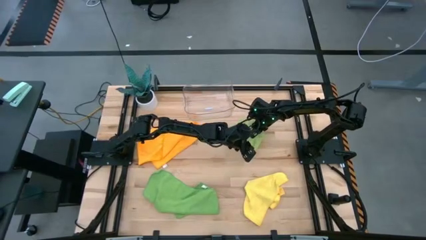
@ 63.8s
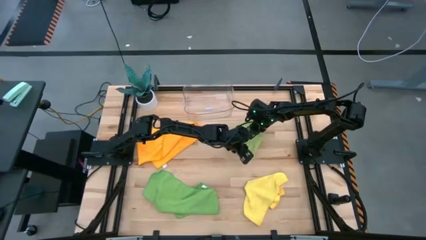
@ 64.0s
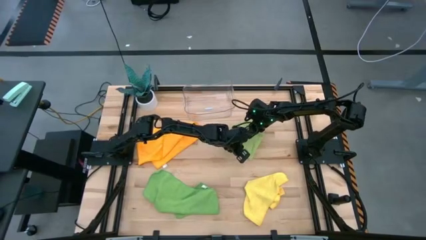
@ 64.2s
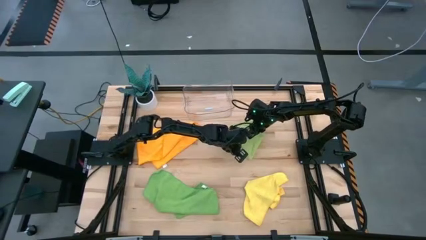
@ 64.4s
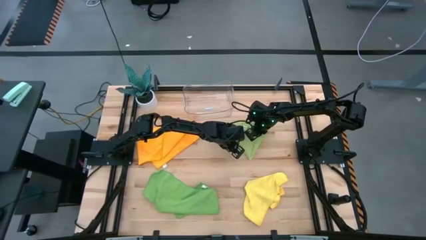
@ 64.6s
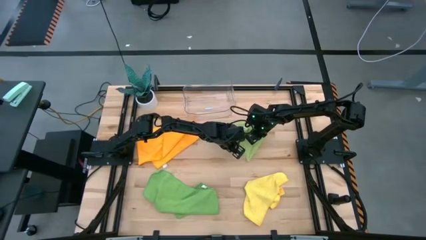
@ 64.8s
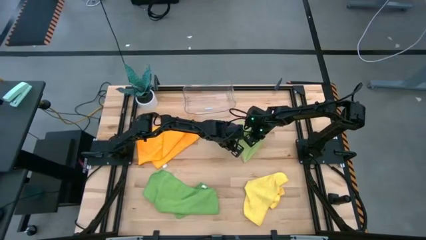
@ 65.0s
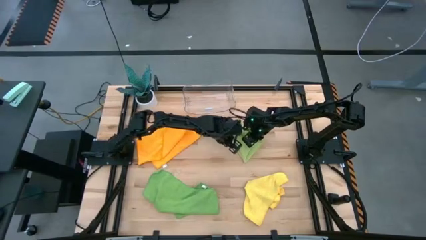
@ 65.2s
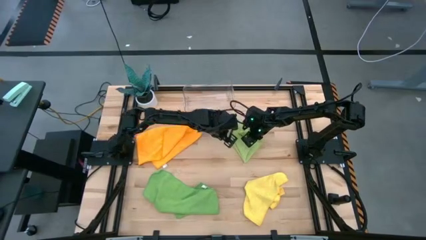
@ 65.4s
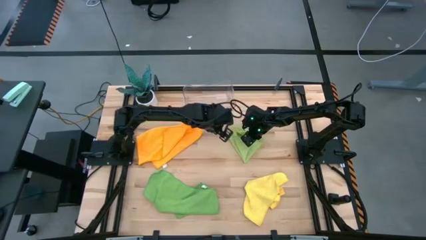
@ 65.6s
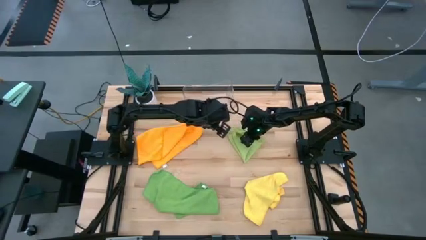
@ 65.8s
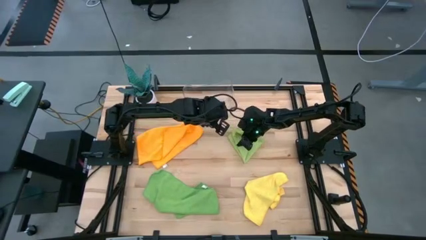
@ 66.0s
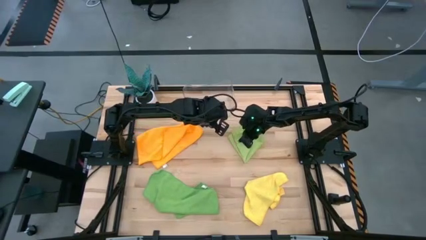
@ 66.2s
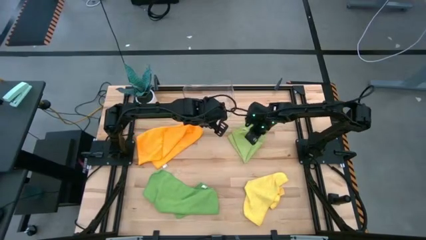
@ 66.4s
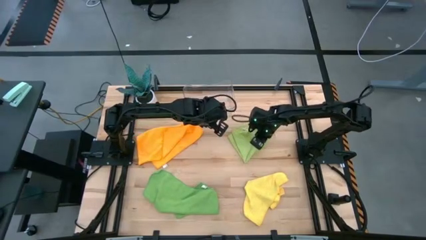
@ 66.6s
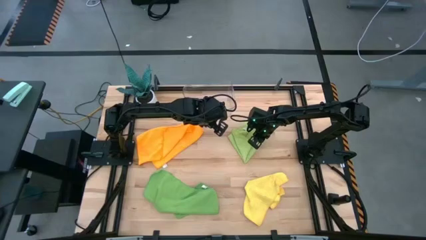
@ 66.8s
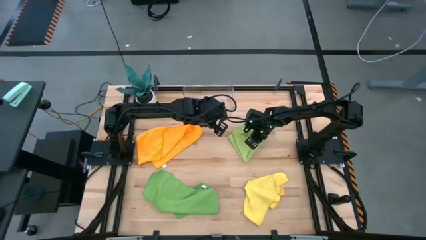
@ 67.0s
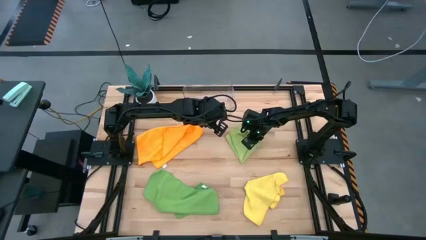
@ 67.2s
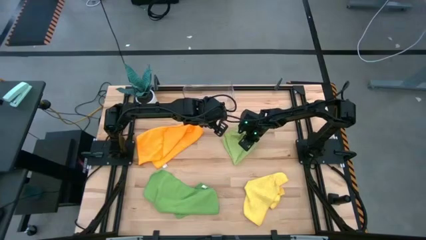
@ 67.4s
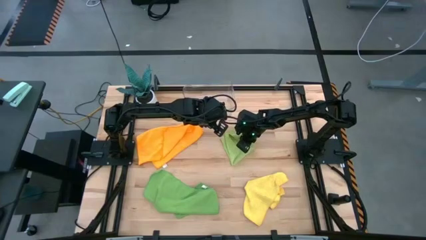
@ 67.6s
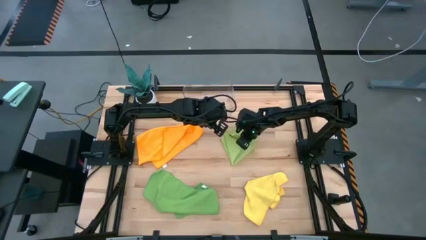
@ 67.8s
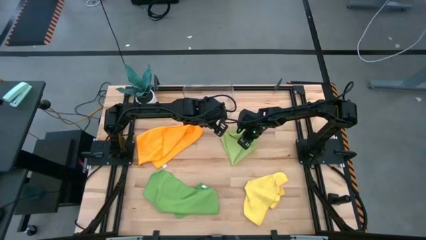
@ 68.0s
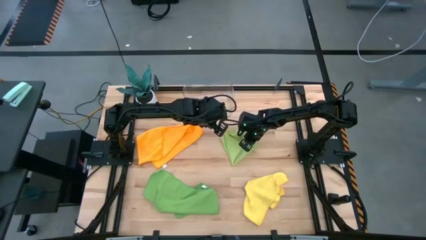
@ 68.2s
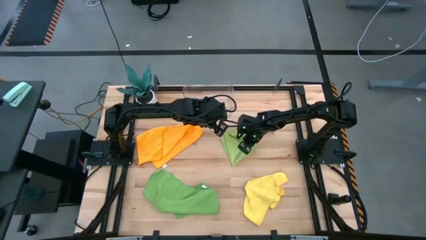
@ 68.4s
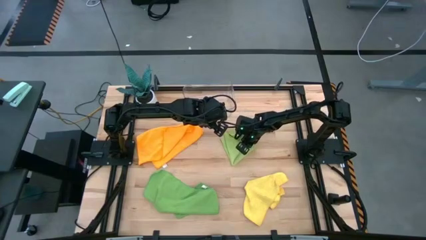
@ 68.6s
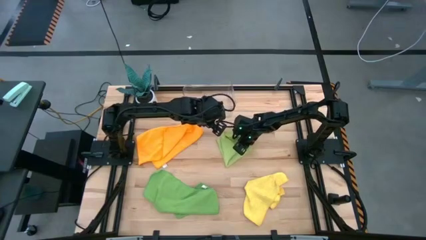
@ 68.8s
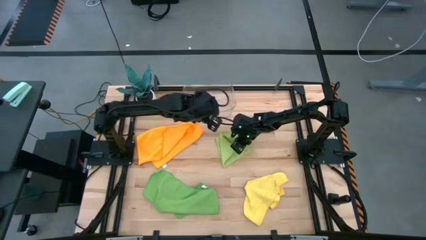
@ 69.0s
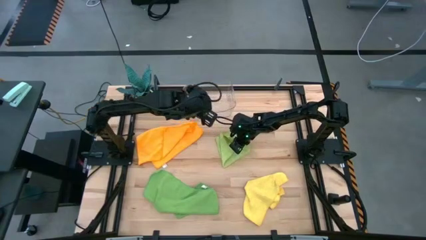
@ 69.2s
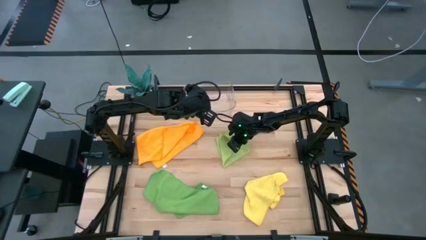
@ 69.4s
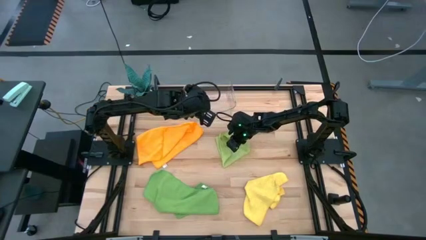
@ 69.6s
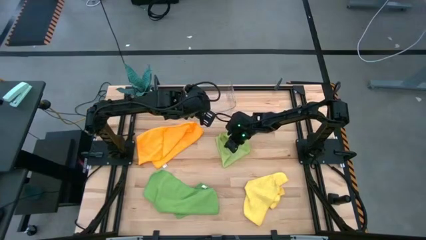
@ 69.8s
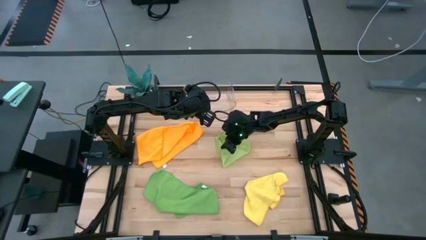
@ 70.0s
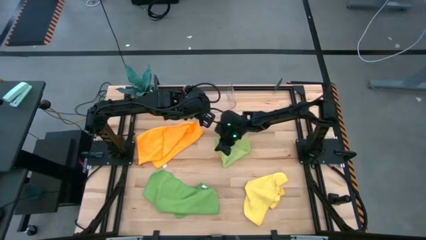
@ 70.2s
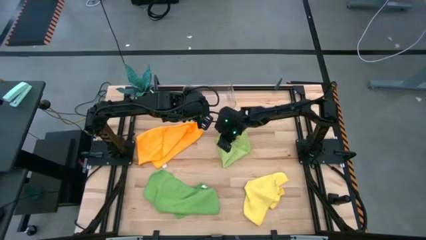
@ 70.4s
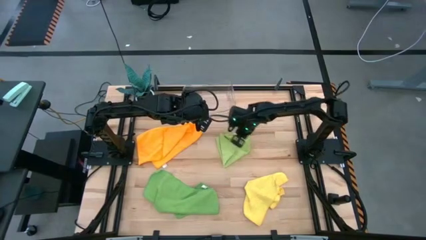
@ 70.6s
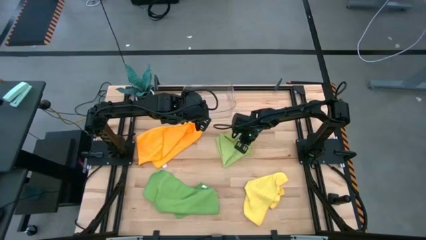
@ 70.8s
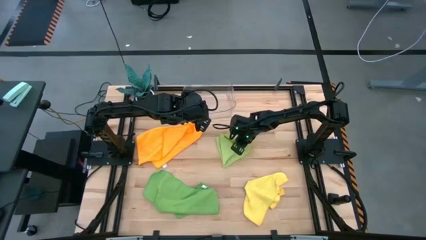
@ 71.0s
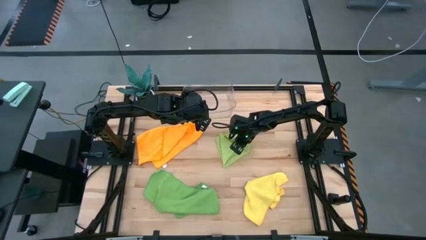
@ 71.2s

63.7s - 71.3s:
Task: Fold microfiber towels
Fold the light green microfiber cloth

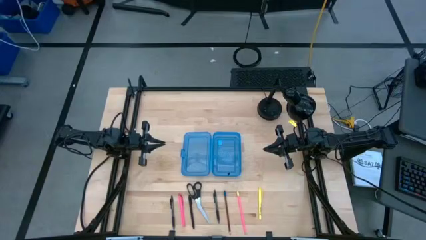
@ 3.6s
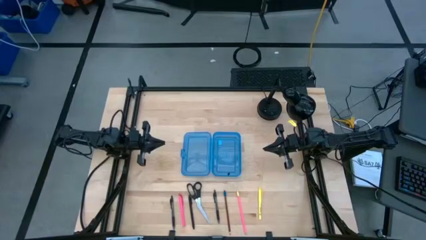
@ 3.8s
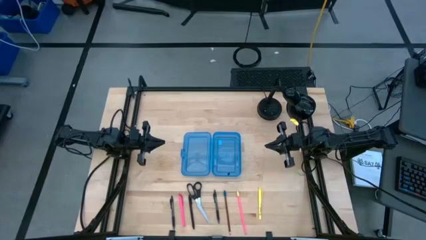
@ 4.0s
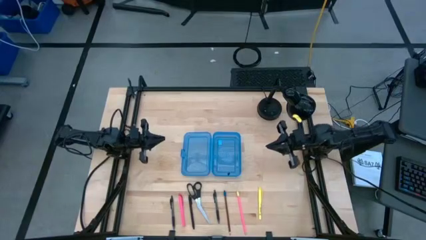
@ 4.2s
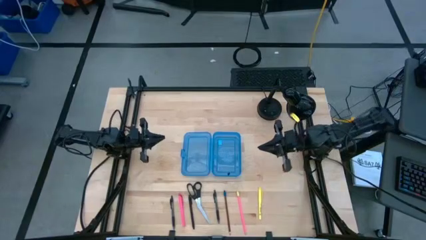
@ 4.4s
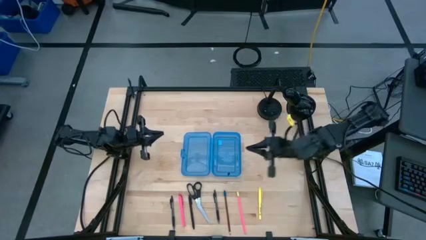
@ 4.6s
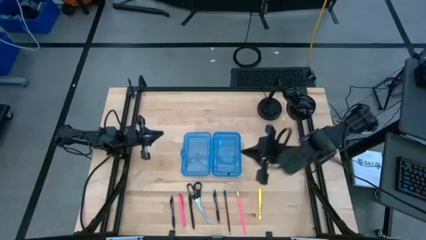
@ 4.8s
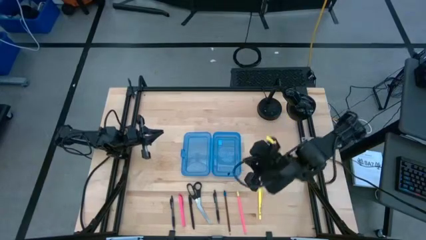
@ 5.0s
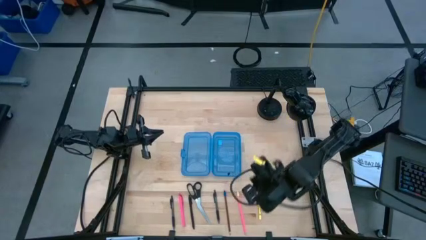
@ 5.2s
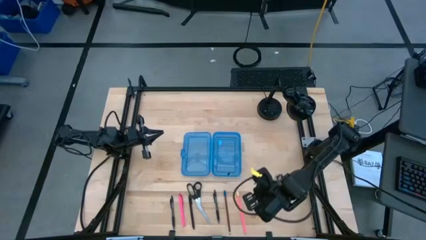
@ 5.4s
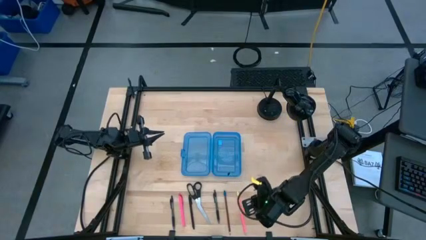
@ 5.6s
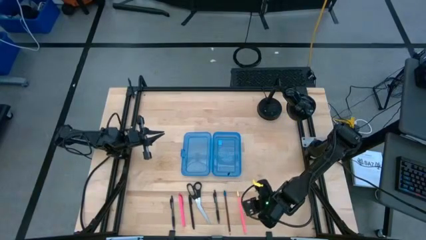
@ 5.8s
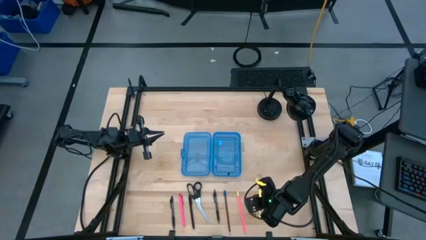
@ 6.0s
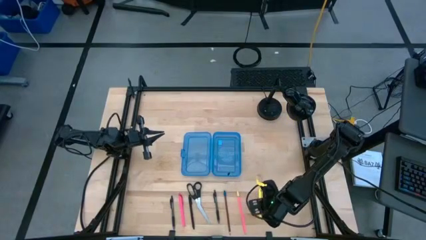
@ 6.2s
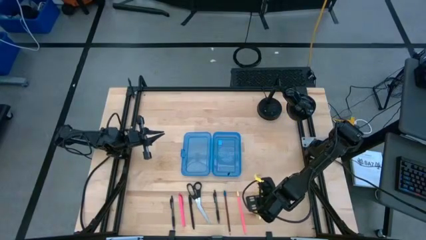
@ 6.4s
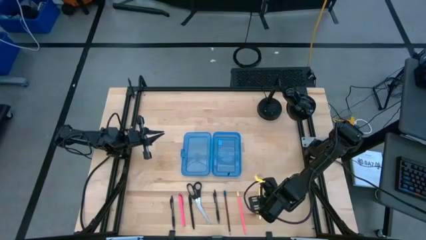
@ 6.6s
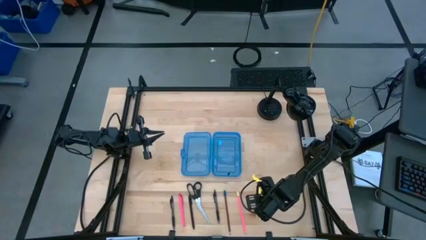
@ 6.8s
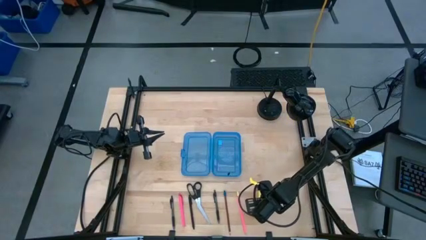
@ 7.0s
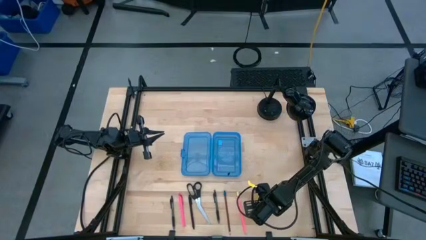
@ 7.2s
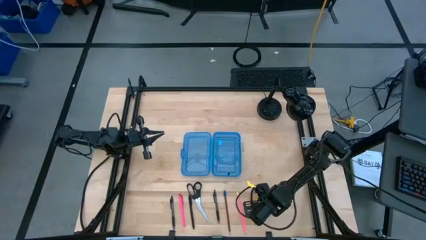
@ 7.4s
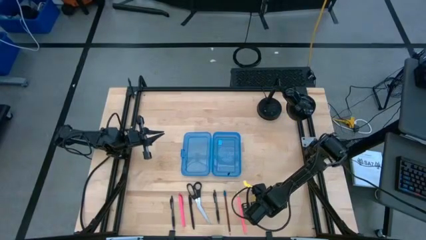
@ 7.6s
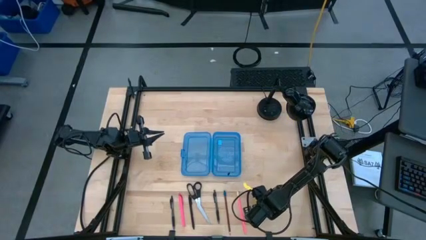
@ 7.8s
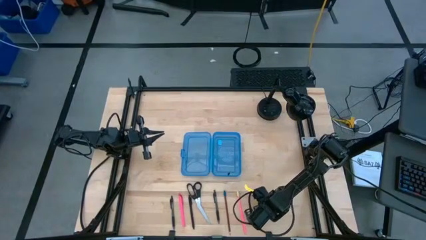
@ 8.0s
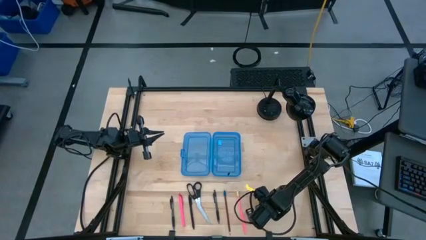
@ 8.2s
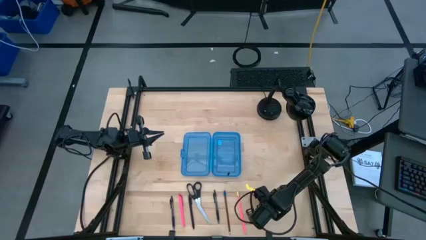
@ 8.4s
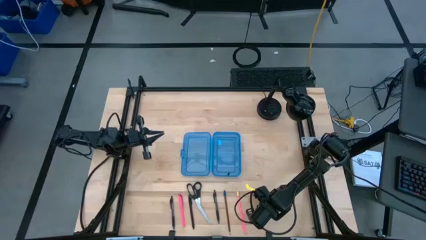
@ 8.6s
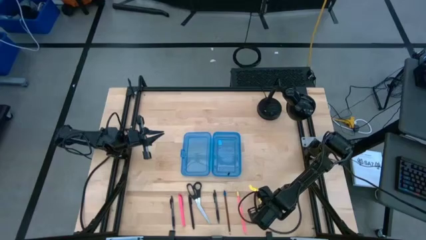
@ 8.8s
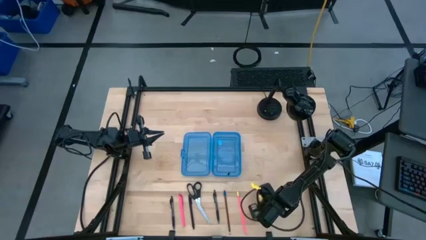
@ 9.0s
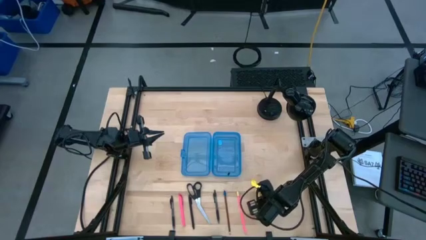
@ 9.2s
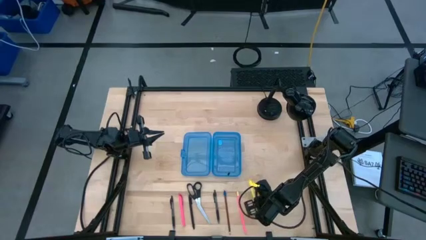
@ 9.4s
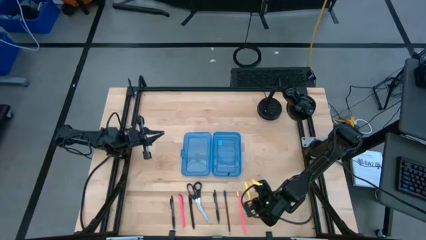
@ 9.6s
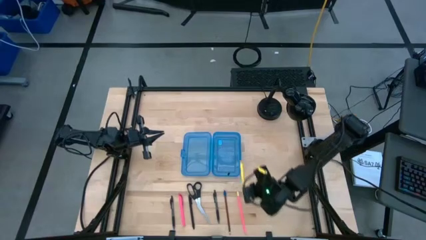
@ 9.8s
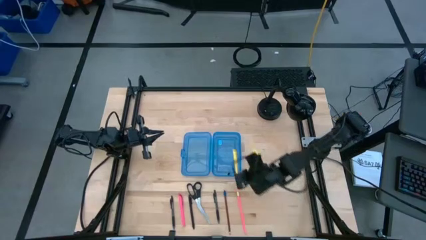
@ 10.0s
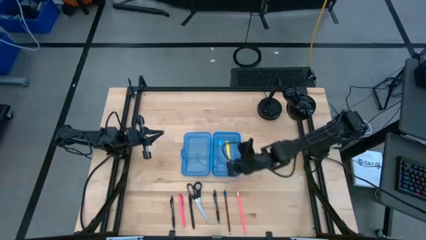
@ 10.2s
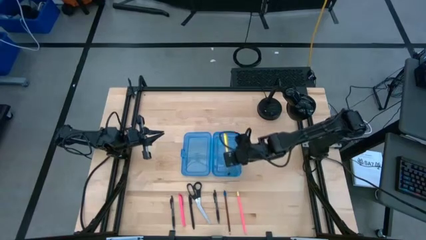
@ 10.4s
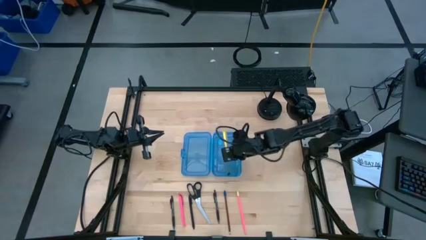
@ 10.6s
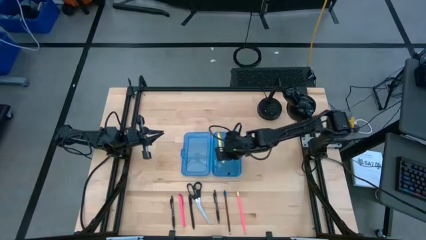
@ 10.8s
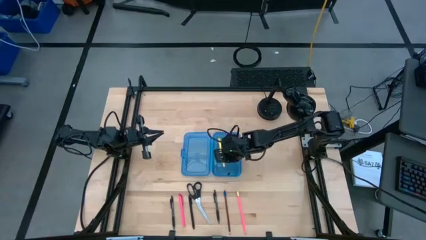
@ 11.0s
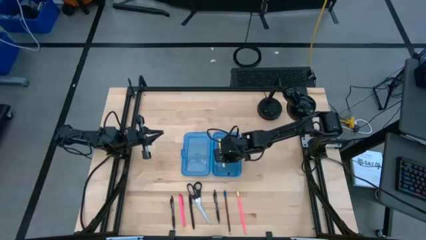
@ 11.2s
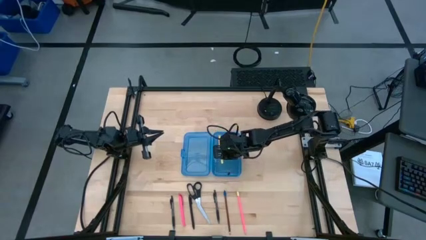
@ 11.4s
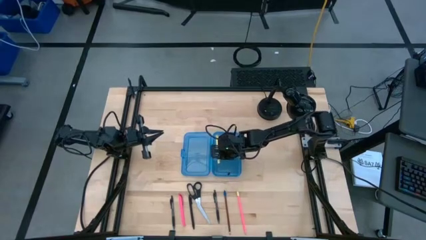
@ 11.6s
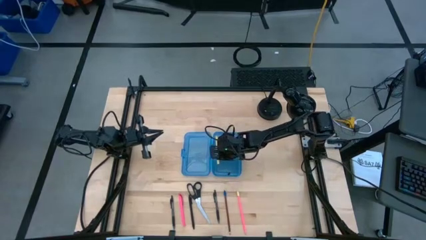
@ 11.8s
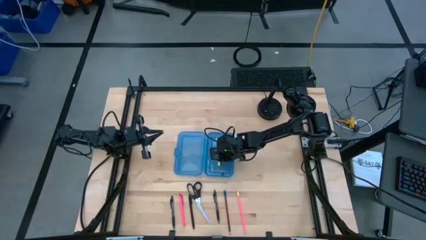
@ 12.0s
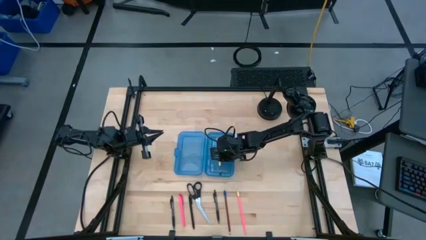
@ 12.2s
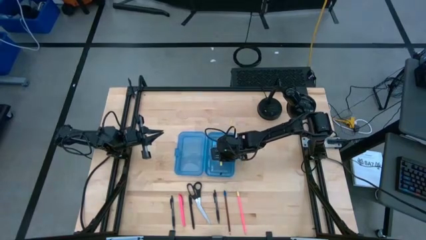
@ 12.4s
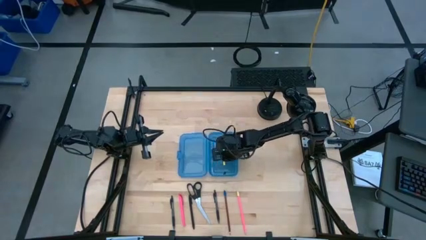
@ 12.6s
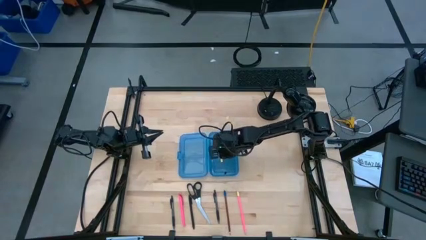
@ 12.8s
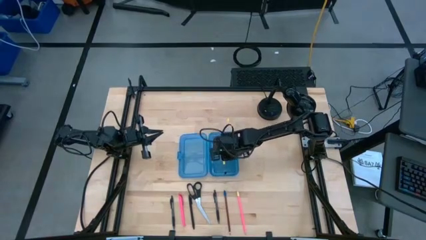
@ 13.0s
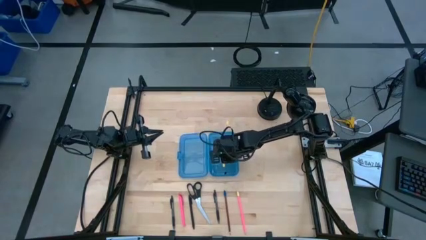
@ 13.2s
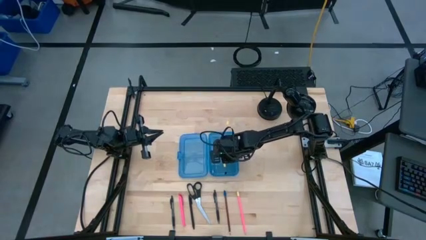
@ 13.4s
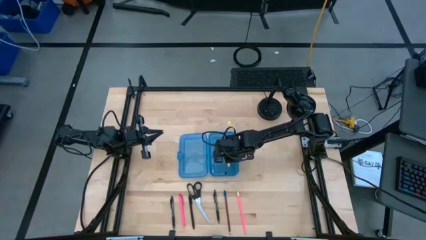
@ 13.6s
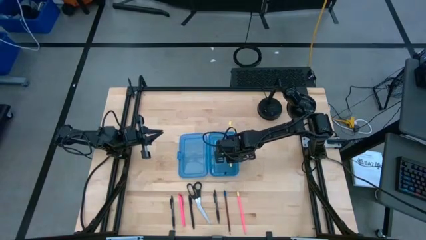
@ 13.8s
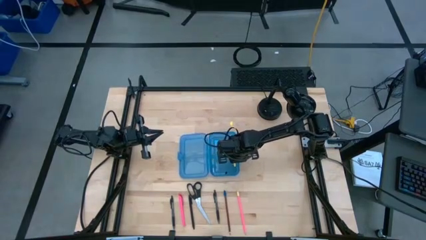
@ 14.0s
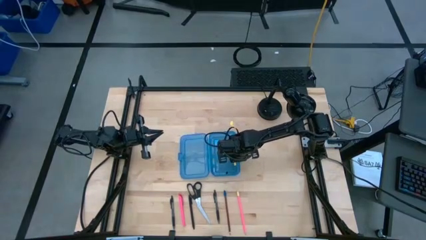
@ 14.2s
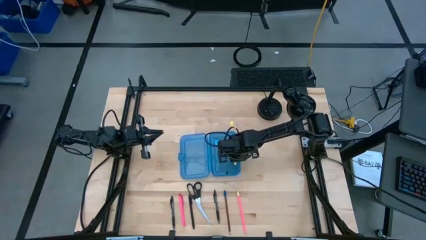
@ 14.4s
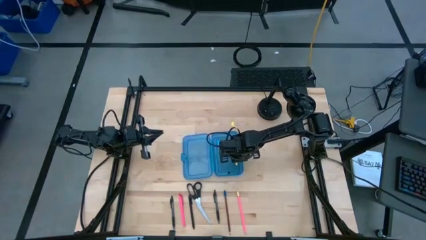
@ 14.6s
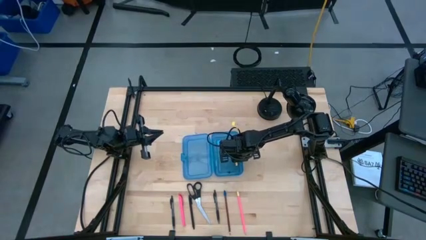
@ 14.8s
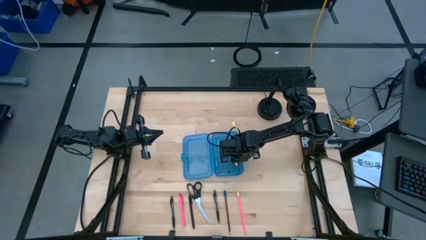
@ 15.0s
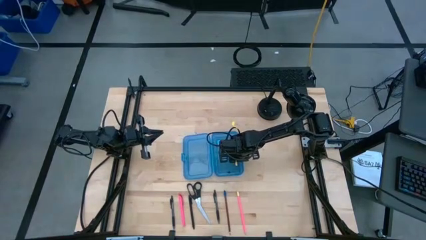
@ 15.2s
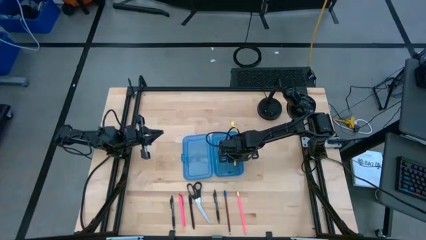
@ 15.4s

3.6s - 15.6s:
Task: Pick & place school supplies into a supply box
Put the yellow pen into the blue supply box
